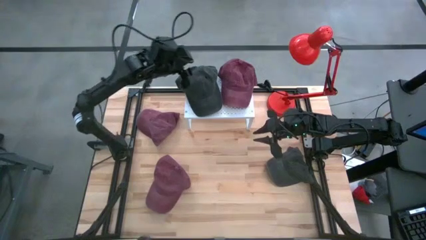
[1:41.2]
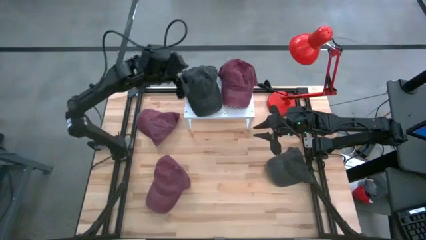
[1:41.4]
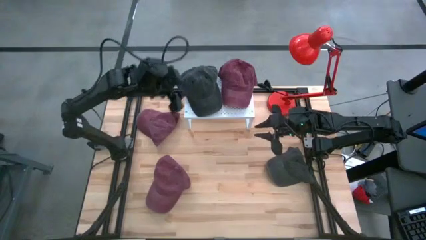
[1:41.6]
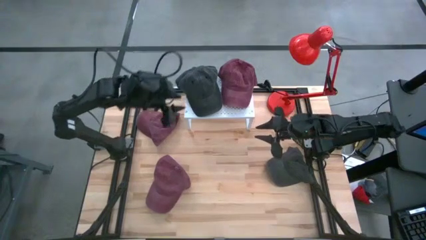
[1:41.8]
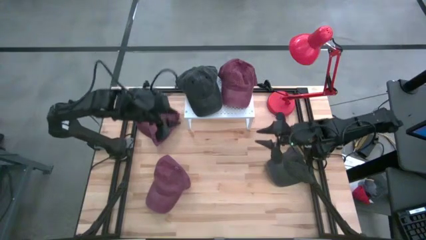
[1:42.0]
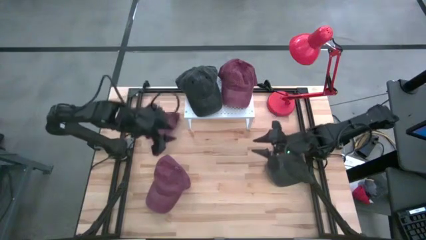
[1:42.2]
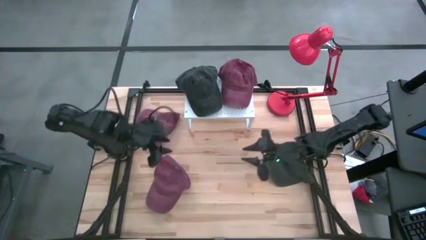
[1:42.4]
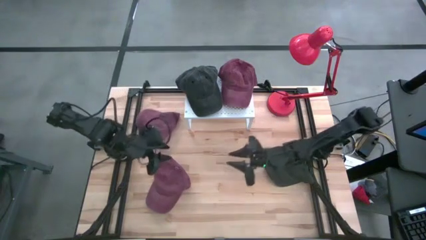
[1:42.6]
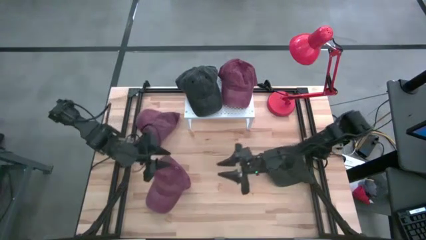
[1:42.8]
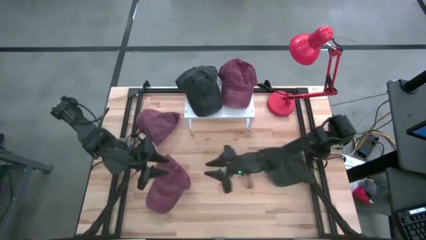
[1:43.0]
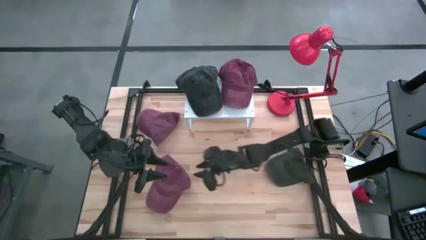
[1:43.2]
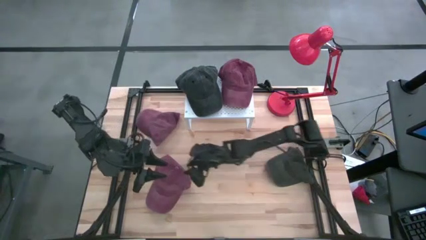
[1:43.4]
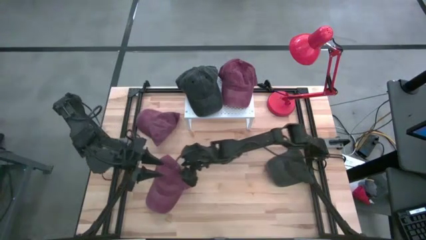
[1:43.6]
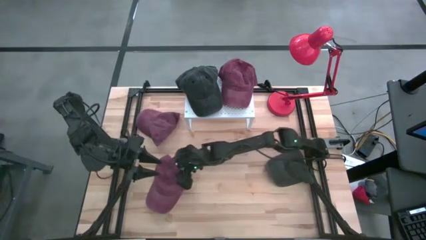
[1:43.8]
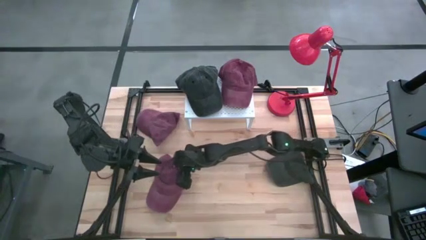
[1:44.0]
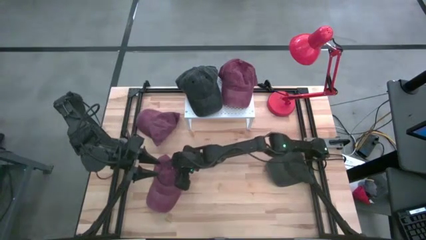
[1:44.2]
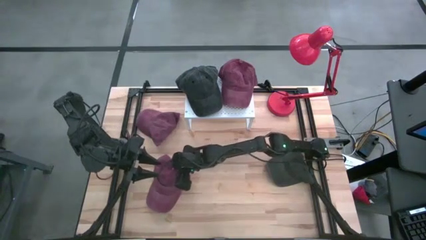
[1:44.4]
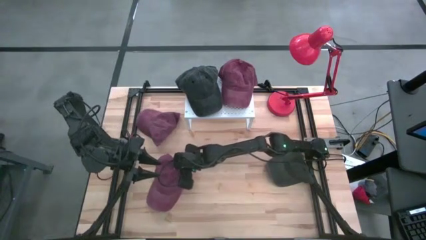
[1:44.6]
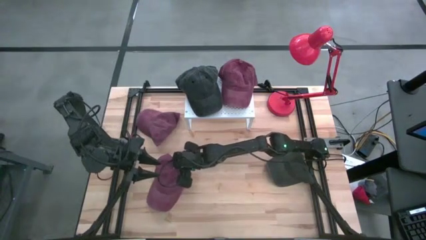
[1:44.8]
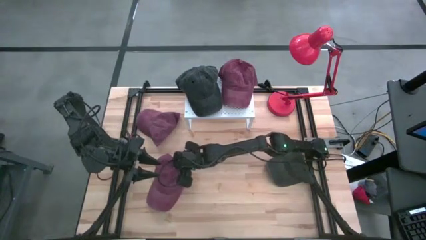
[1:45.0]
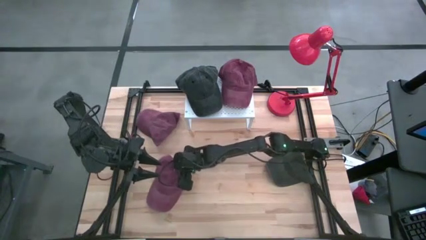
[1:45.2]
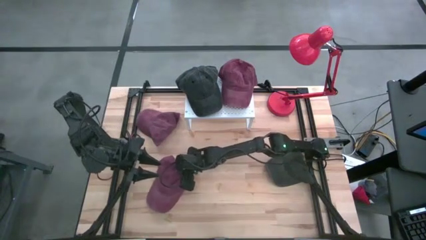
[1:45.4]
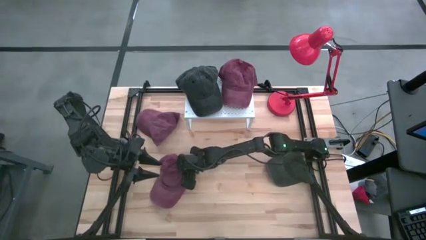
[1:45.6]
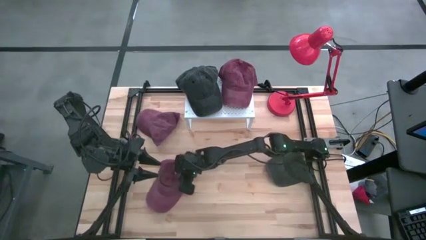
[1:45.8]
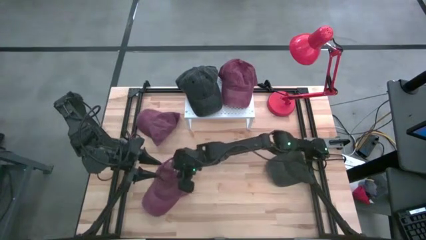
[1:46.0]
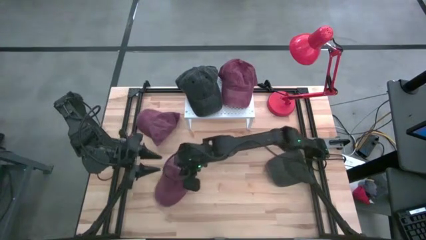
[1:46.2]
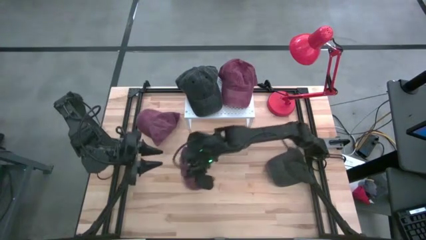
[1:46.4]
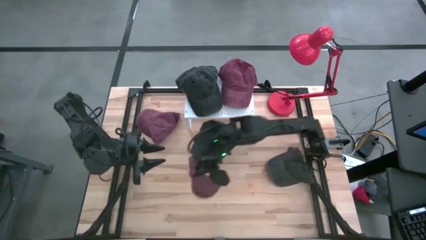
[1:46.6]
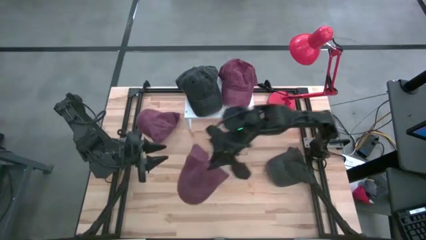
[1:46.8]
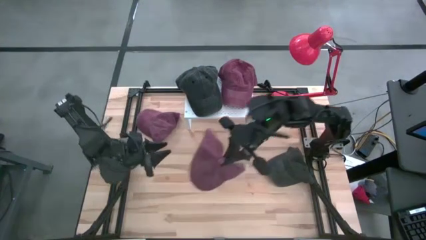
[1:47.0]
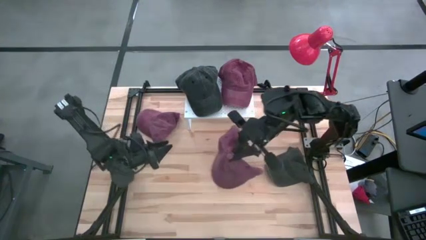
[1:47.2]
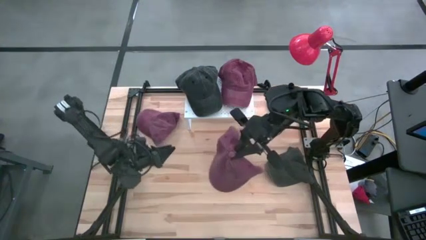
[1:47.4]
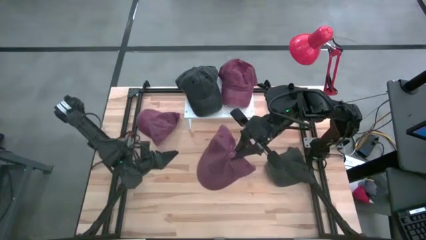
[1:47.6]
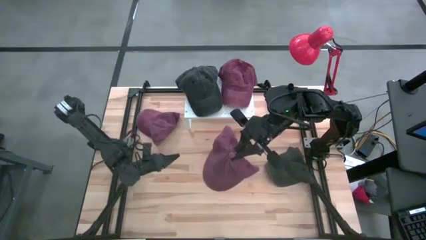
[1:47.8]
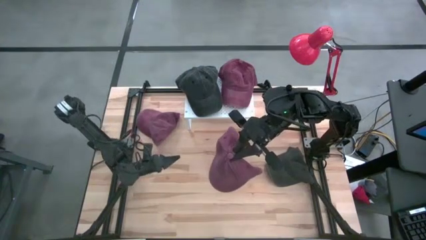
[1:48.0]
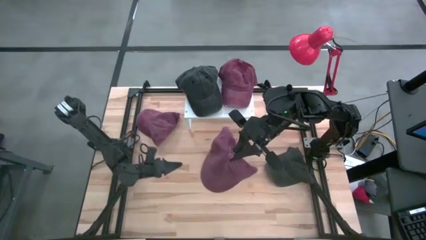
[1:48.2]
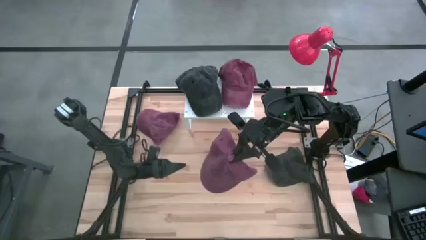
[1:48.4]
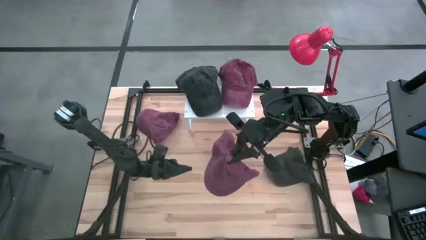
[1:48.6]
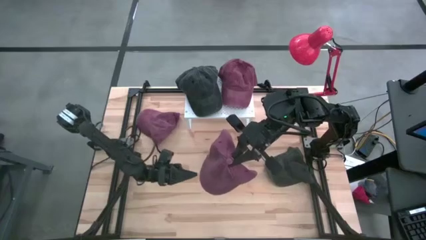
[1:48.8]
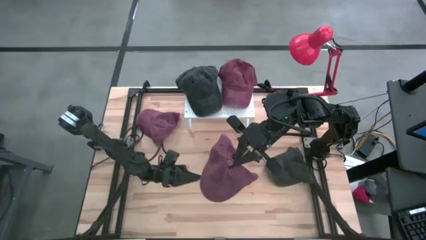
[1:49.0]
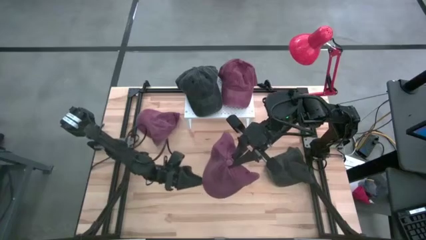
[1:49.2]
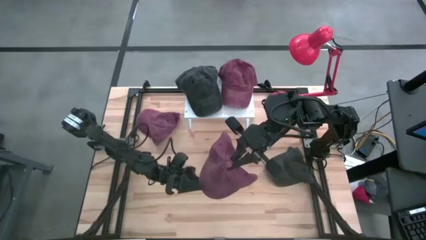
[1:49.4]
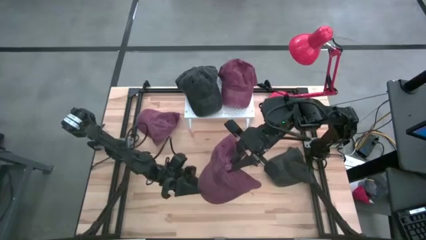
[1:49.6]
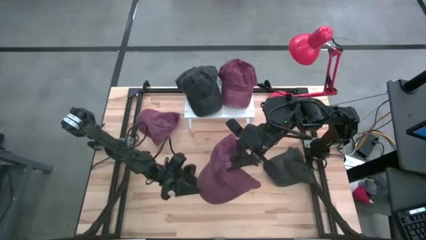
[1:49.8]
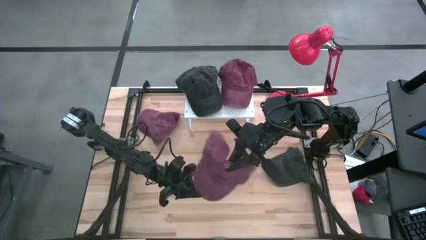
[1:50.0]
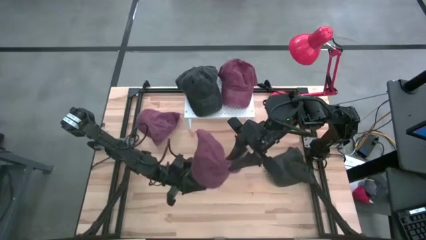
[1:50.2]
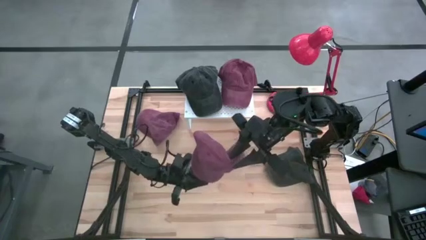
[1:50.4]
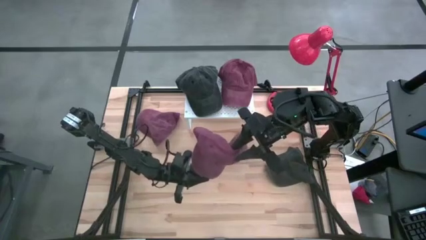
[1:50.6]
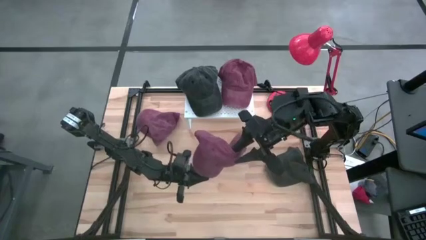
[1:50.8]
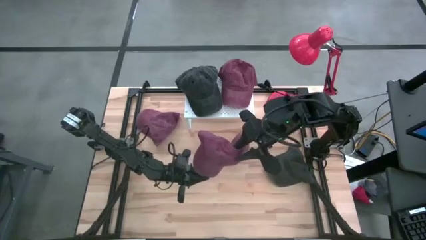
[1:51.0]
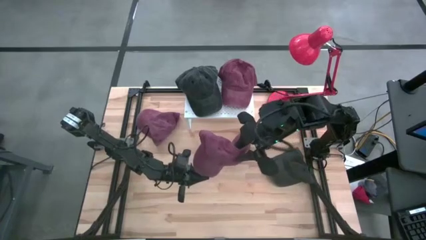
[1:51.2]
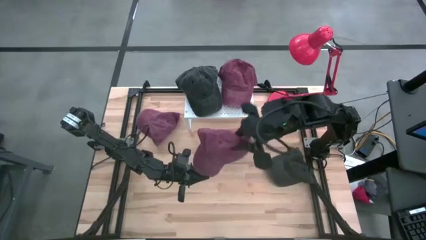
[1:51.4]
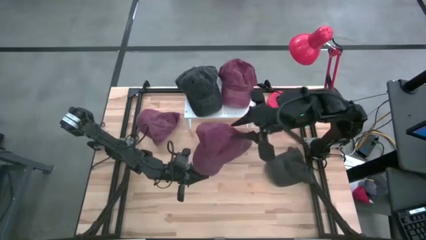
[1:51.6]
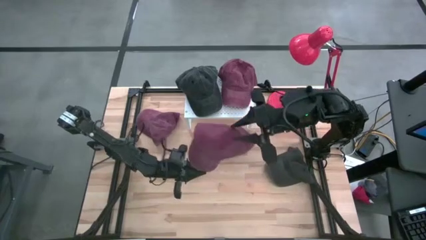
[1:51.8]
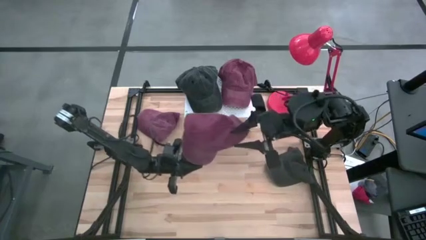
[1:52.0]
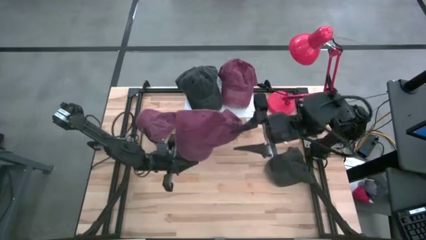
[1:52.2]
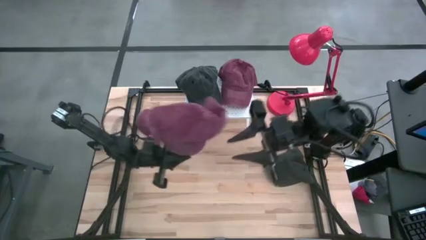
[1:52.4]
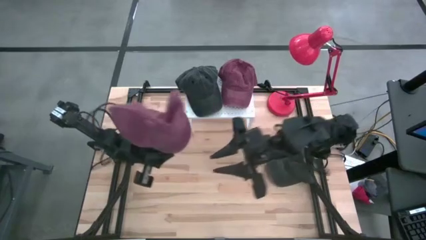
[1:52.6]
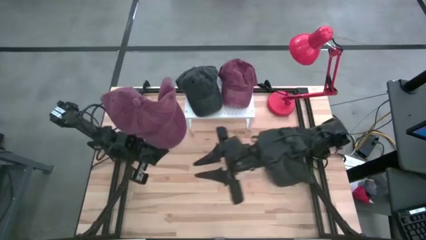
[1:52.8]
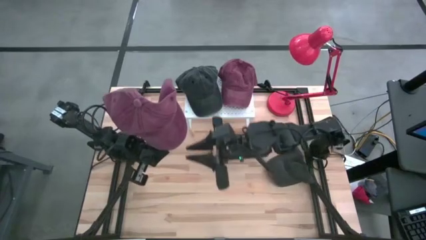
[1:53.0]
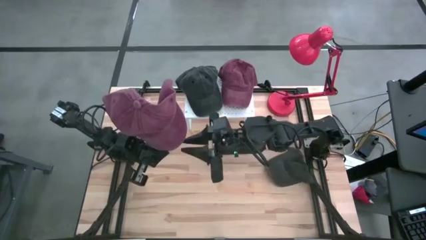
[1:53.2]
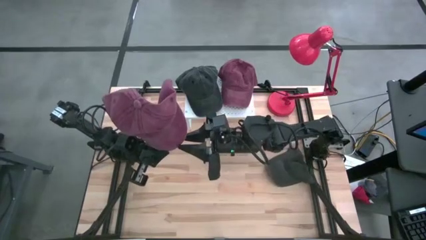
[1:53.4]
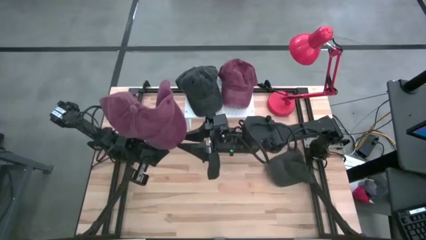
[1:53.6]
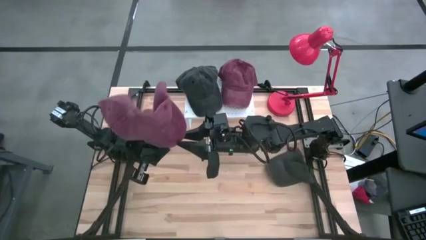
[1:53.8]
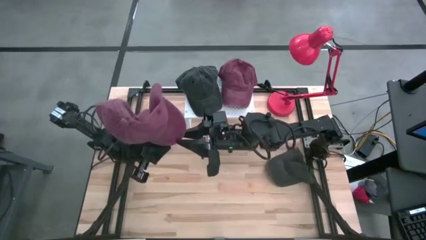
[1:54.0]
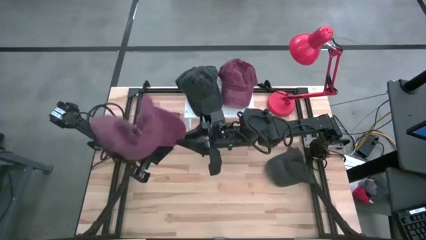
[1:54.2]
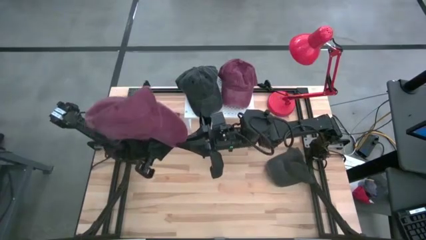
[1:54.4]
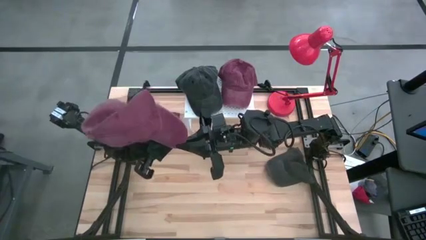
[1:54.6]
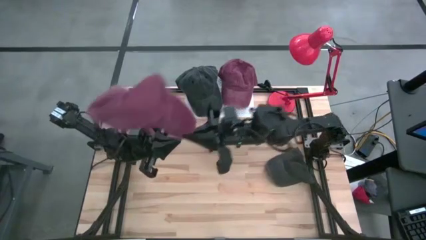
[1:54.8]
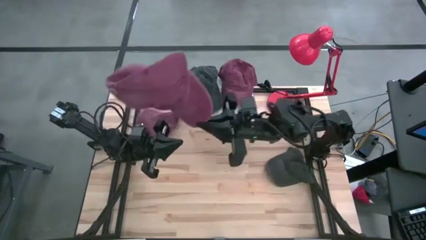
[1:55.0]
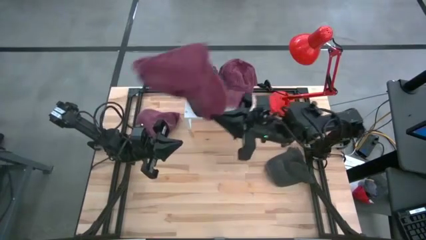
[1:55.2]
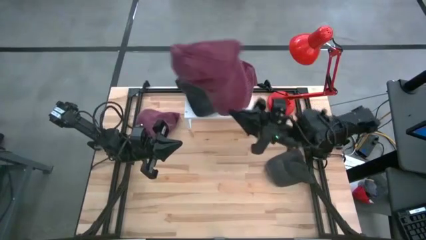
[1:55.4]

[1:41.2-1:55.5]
Task: Pick & Place hat
Stack the bottom red cap on top of the red cap on the shelf

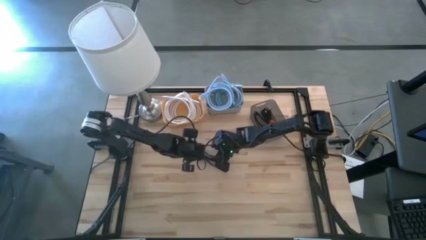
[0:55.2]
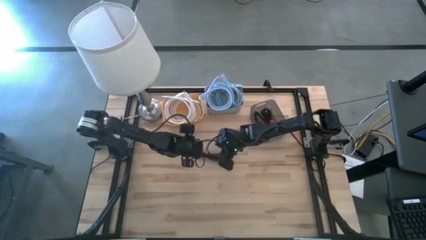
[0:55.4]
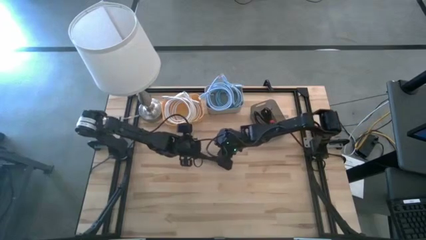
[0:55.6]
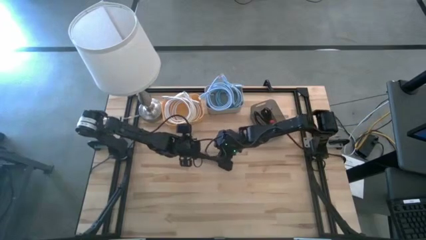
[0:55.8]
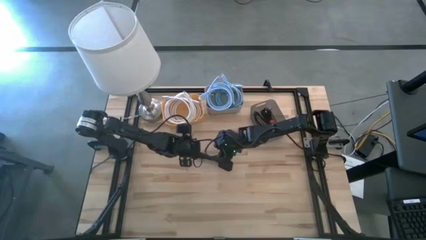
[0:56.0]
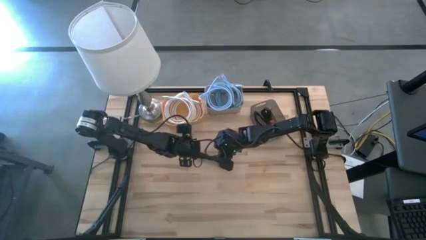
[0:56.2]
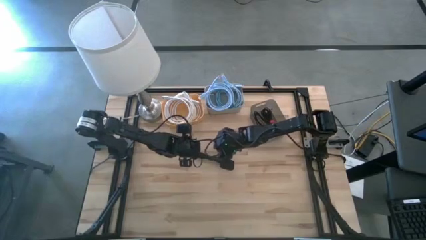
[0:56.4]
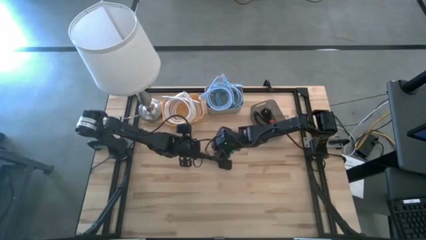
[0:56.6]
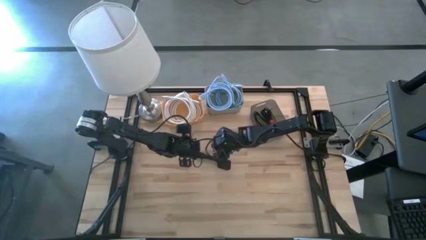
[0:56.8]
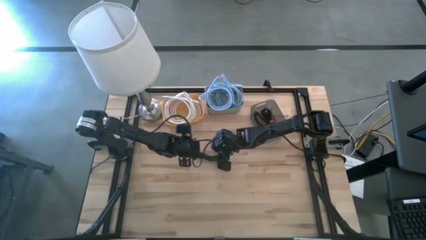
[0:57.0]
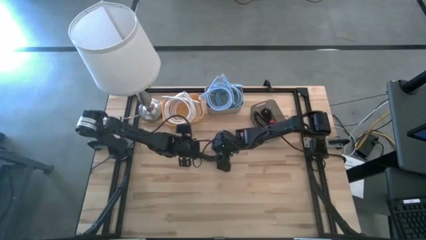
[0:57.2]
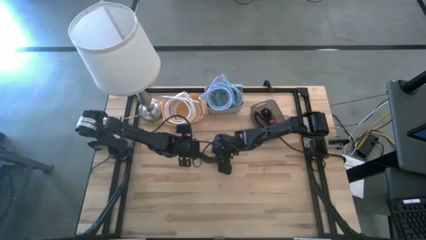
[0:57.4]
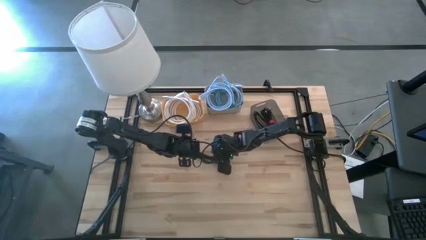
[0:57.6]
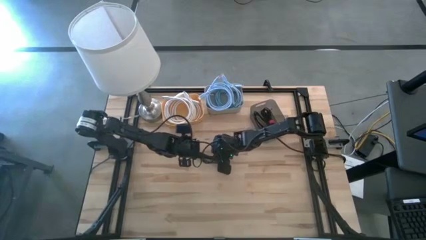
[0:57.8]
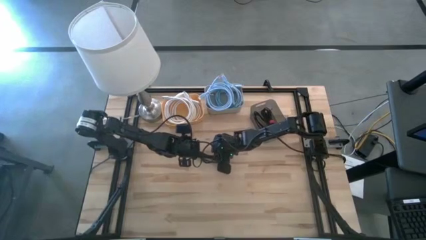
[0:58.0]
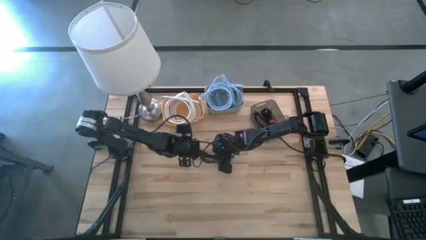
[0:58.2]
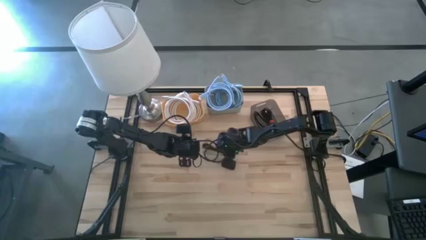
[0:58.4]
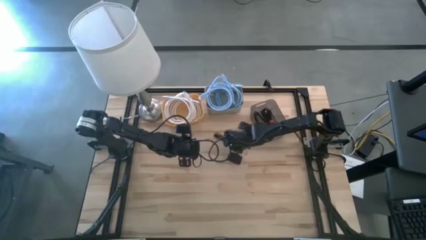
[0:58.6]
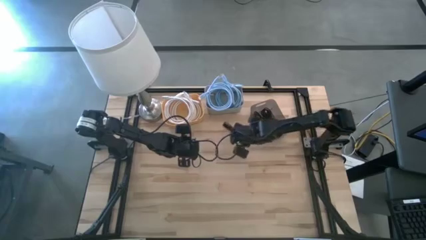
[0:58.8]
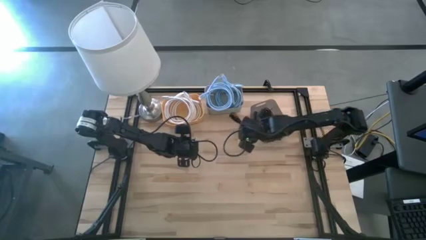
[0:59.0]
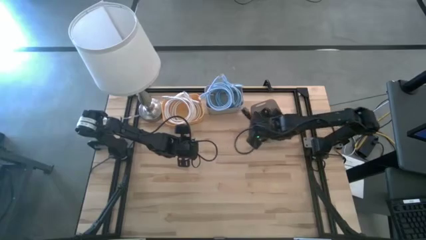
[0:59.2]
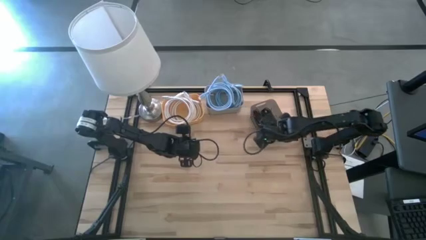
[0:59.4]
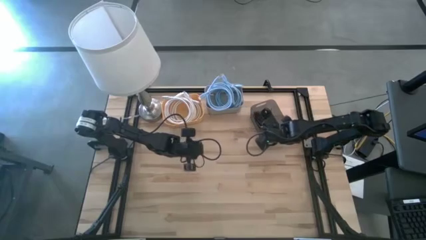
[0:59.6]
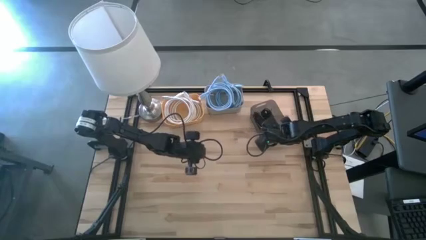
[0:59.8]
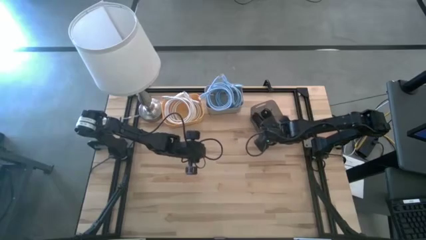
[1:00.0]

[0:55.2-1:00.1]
Task: Pick & Place USB Port
Put the black charger cable into the black bin
